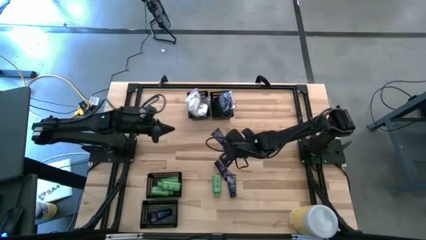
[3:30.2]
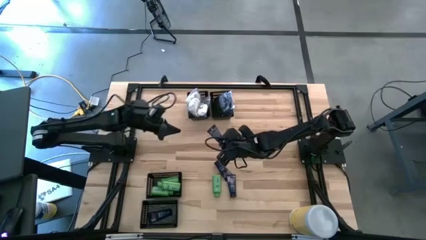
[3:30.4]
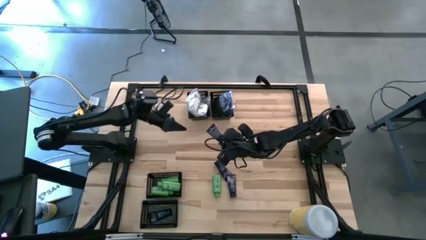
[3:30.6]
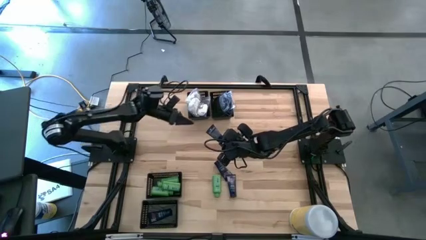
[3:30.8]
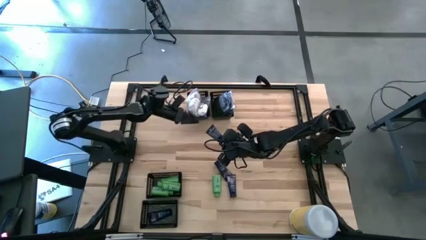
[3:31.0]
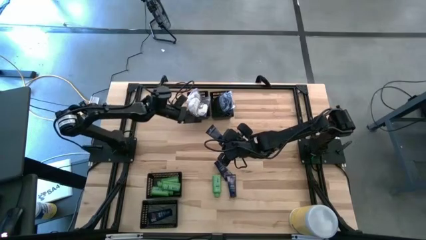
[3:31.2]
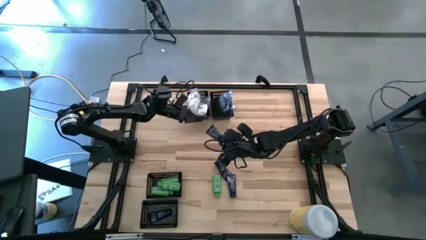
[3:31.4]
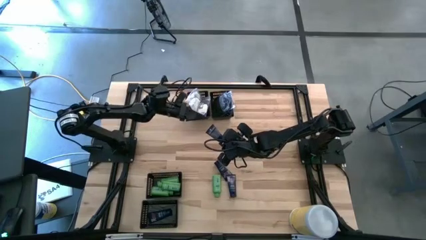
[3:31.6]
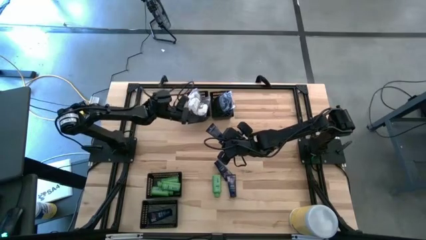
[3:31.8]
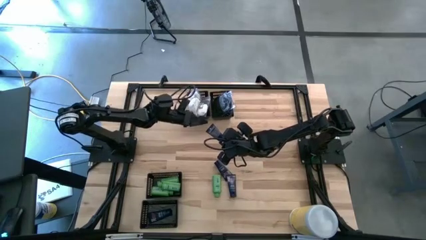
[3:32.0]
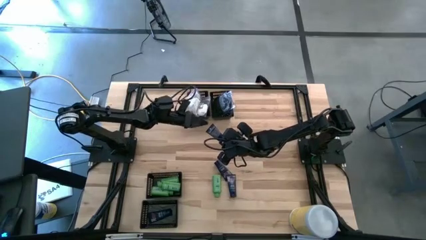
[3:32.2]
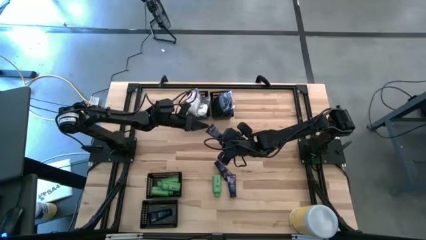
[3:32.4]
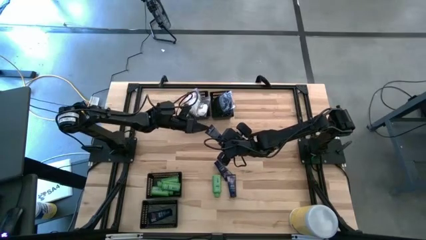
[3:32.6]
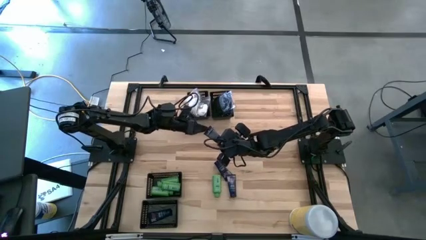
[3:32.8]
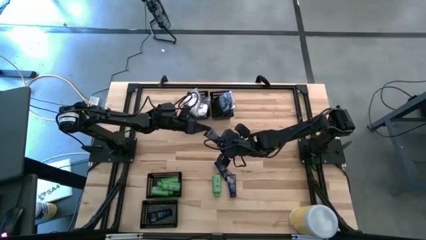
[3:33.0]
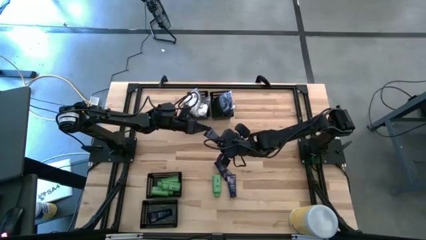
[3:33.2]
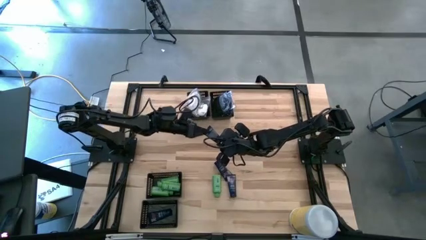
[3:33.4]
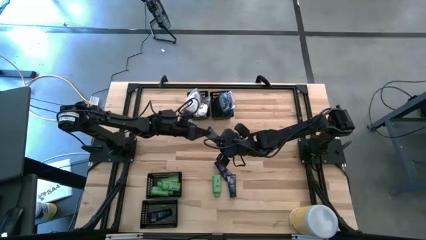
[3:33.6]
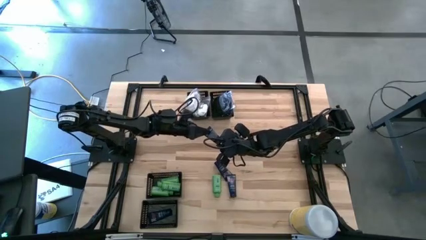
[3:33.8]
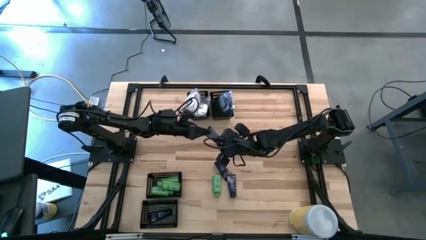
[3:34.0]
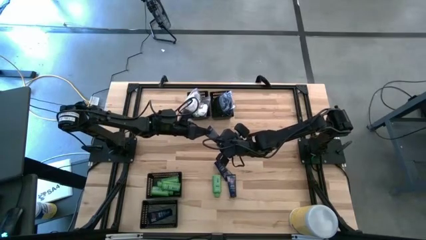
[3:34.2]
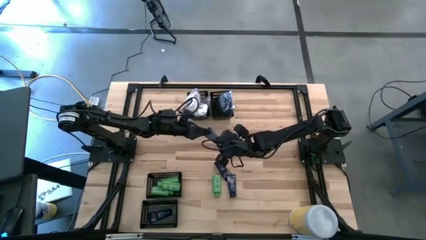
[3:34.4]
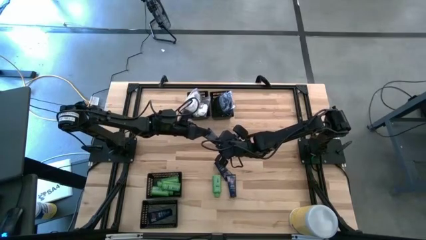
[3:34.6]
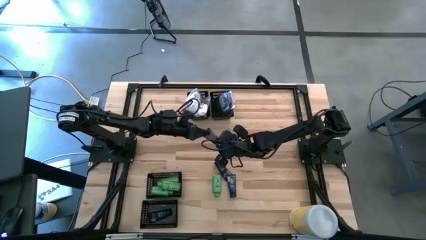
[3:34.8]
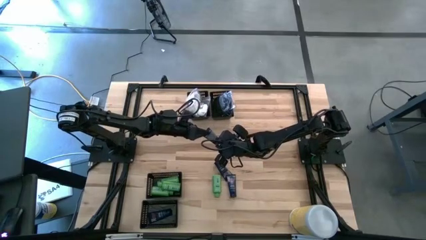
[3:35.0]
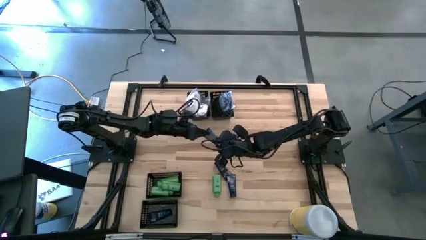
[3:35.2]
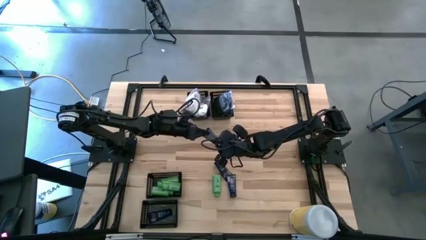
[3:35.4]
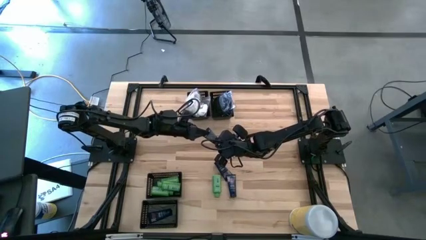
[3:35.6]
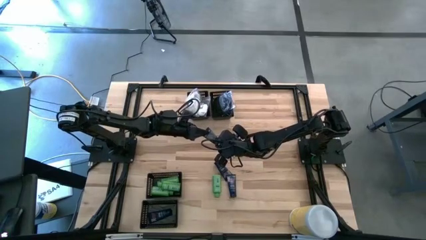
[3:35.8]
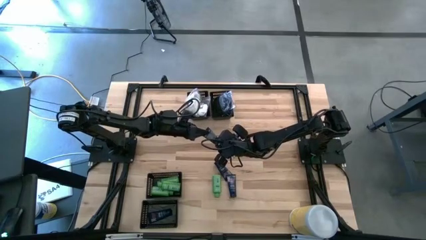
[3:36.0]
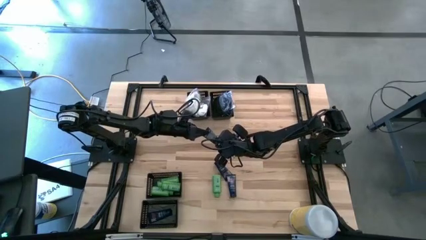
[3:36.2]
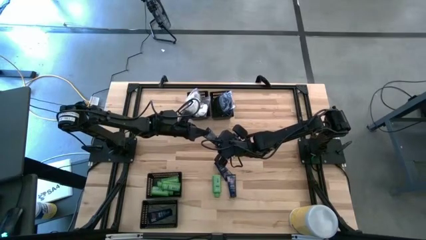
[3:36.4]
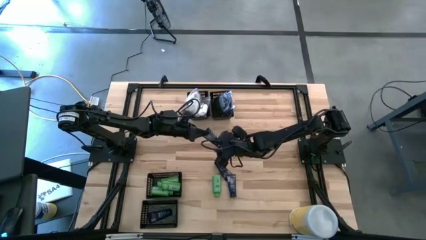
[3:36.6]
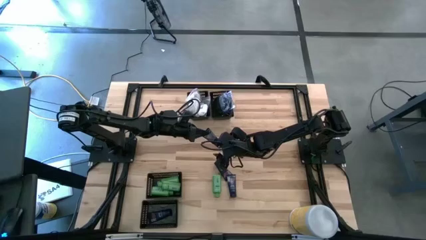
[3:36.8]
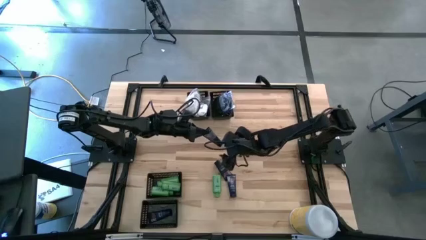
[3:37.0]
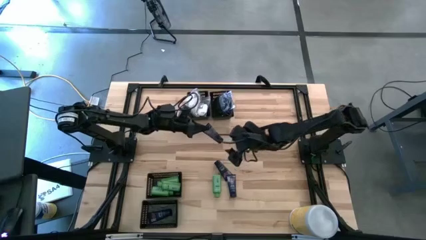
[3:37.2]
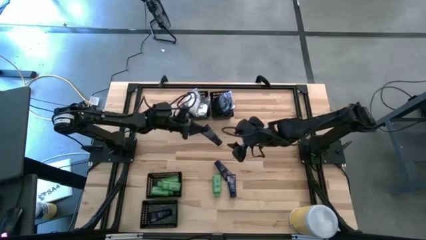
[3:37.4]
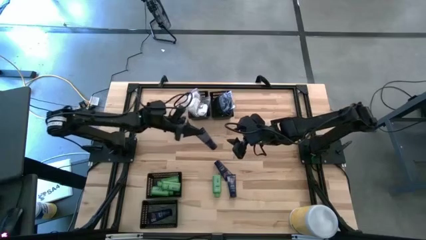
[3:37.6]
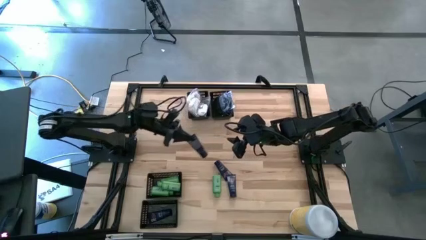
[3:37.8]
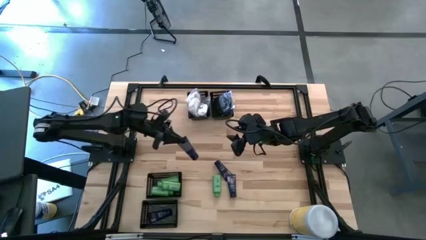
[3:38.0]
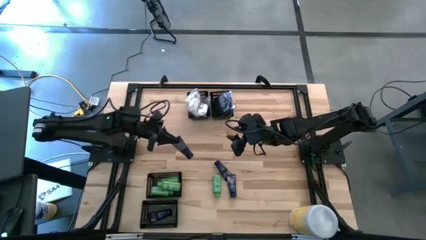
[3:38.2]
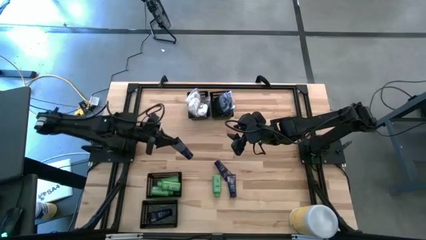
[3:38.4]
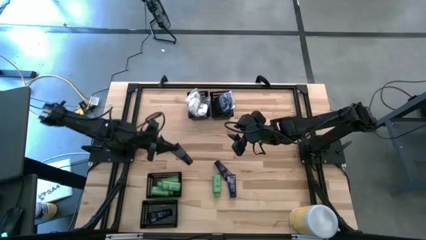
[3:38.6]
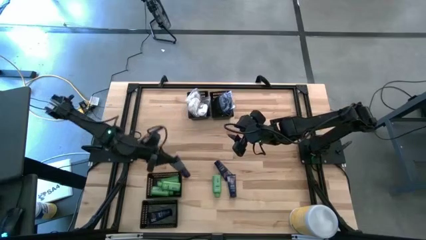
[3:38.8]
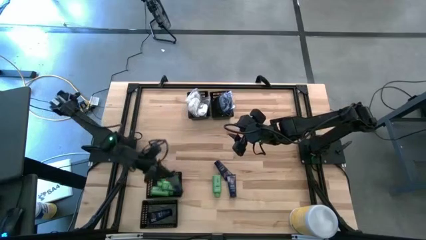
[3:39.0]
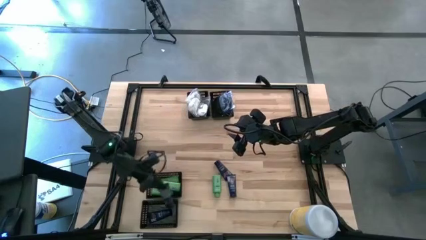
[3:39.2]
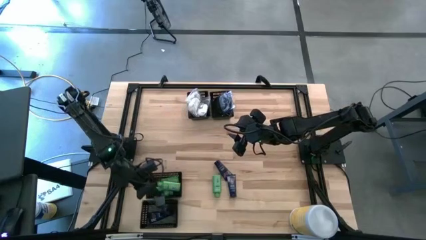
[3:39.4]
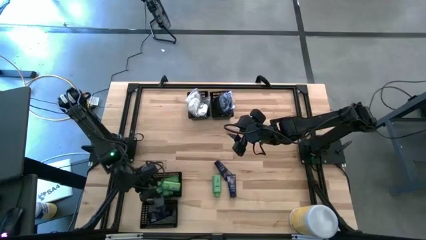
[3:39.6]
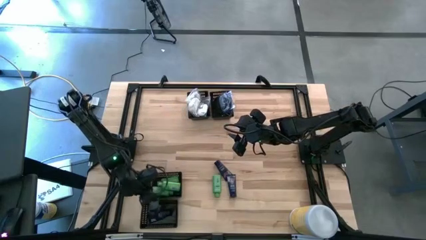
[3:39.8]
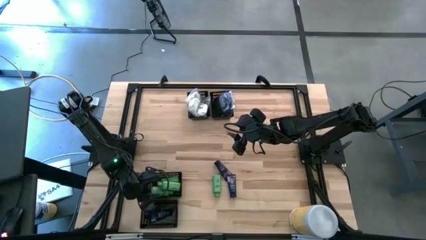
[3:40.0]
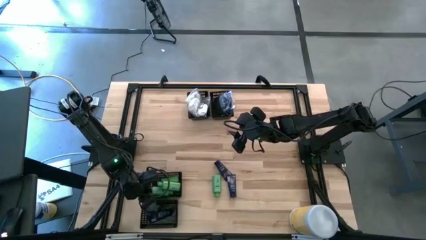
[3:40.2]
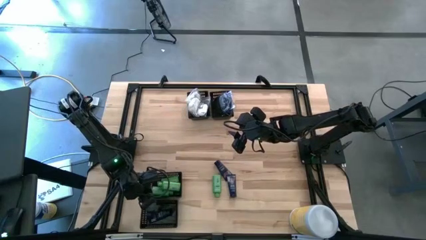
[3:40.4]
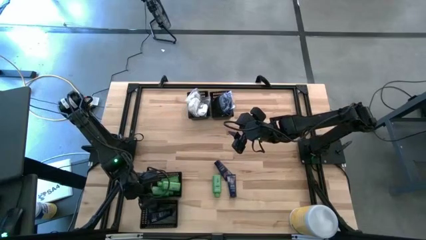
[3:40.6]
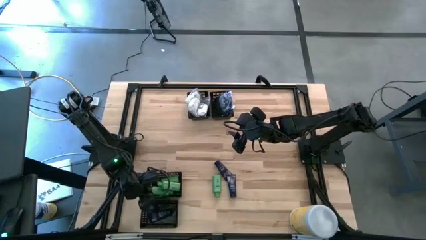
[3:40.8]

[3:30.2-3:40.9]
Task: Pick & Place Travel size toiletries
Put the dark blue shave cream into the bottom left basket

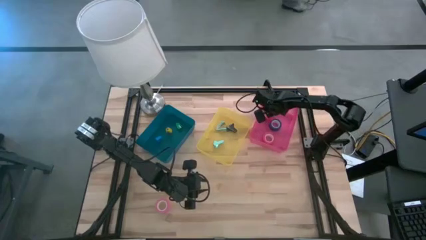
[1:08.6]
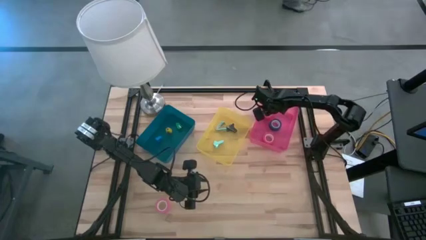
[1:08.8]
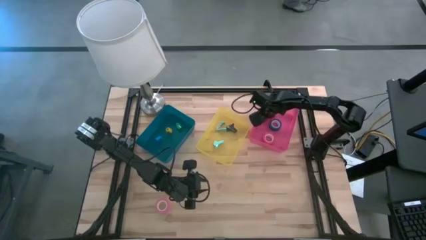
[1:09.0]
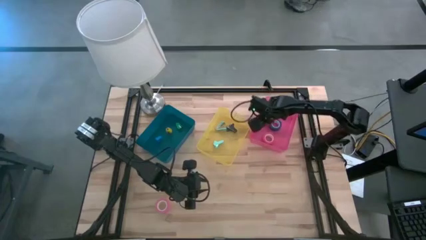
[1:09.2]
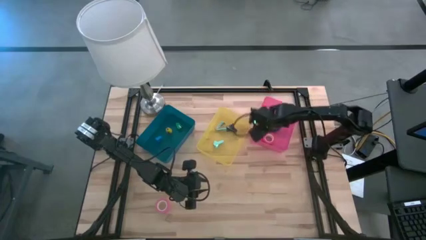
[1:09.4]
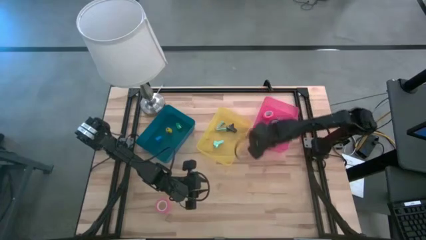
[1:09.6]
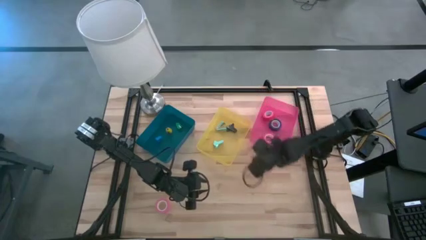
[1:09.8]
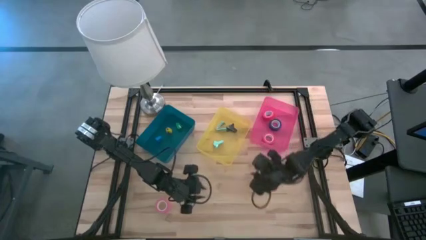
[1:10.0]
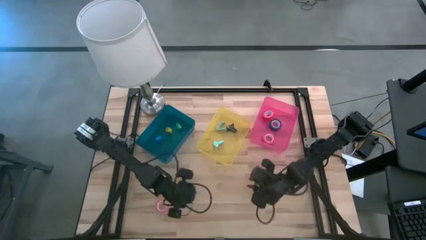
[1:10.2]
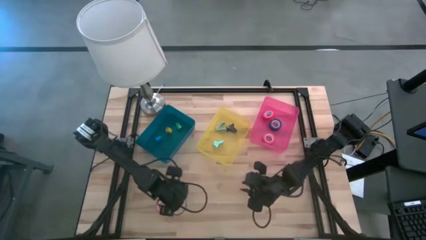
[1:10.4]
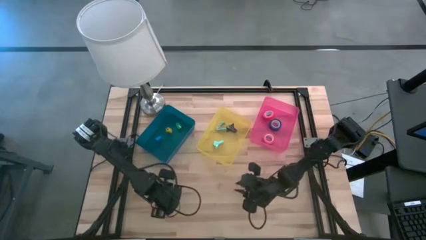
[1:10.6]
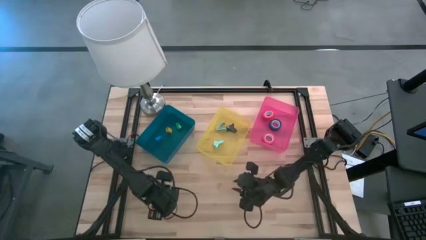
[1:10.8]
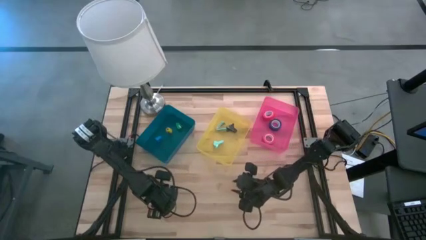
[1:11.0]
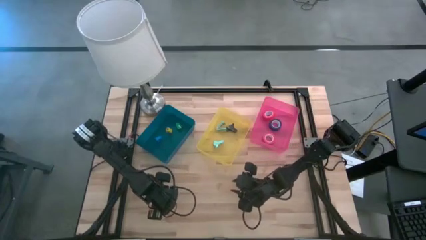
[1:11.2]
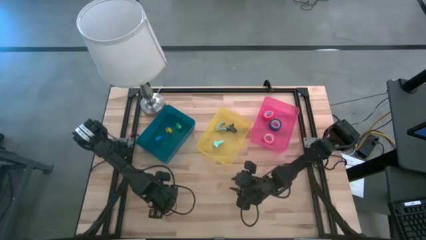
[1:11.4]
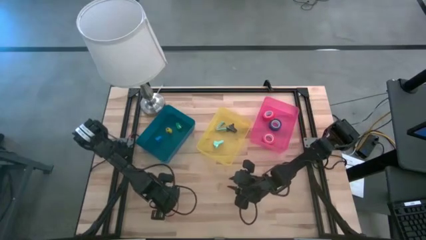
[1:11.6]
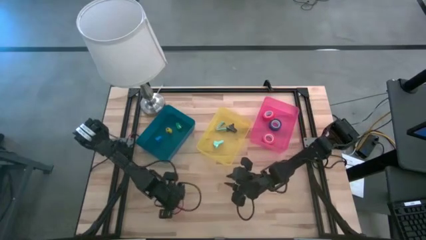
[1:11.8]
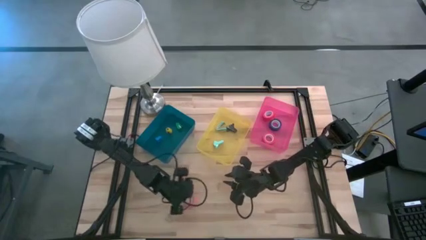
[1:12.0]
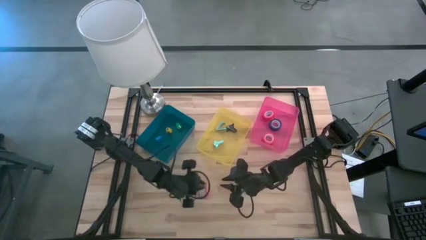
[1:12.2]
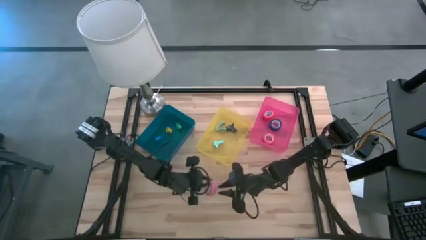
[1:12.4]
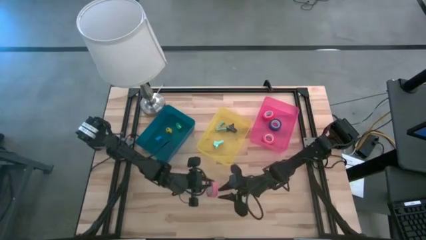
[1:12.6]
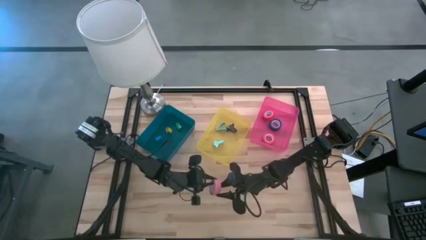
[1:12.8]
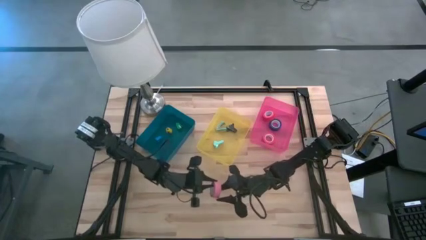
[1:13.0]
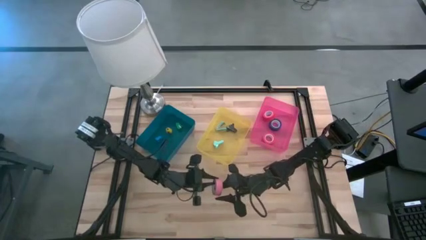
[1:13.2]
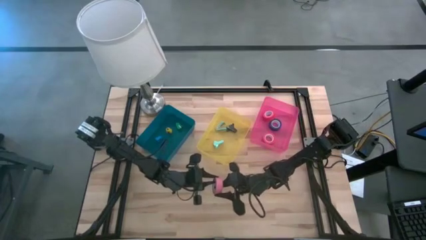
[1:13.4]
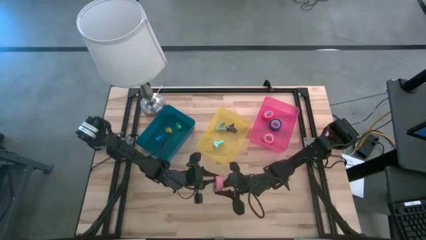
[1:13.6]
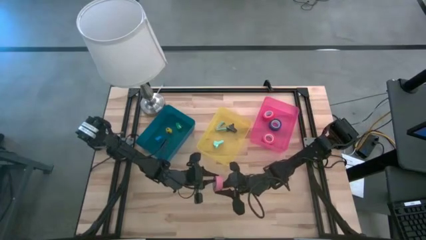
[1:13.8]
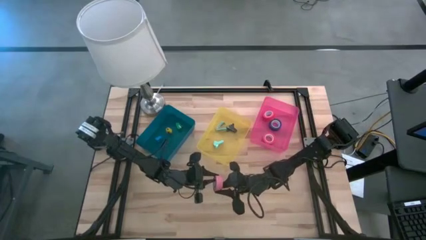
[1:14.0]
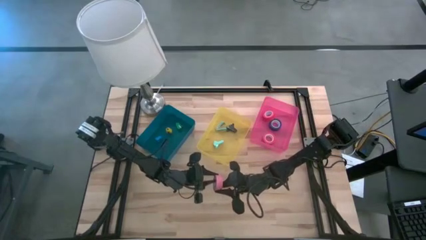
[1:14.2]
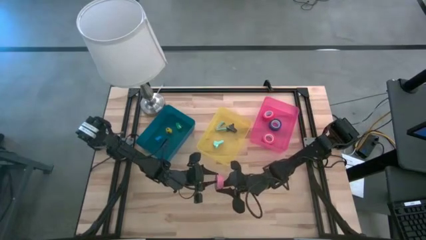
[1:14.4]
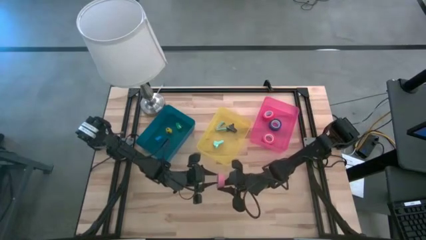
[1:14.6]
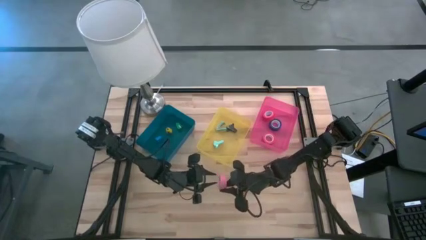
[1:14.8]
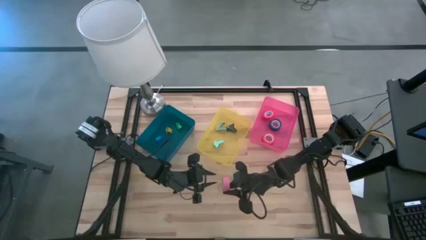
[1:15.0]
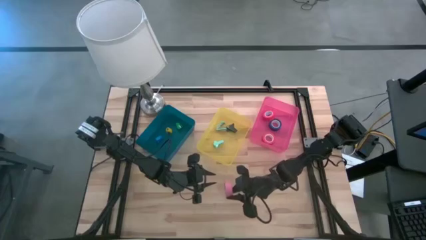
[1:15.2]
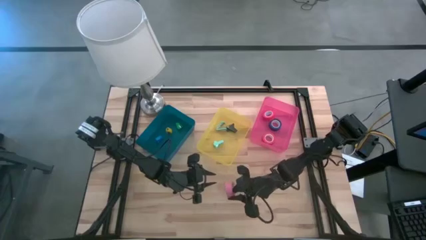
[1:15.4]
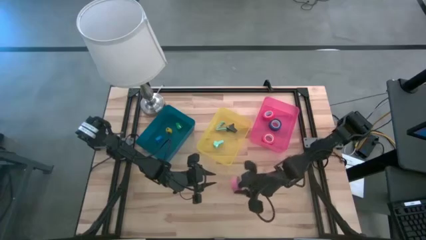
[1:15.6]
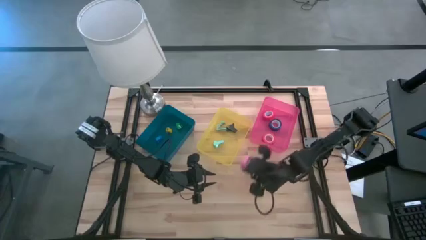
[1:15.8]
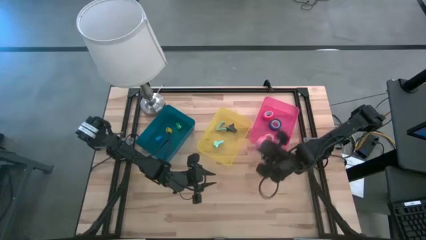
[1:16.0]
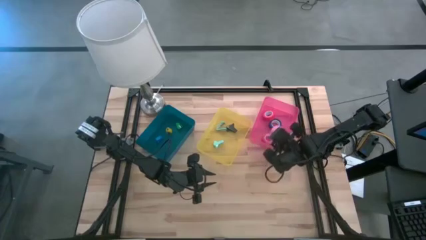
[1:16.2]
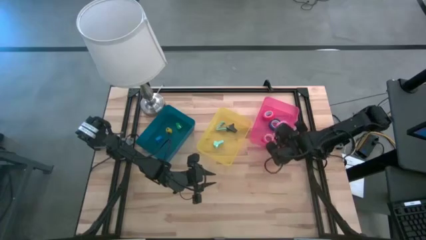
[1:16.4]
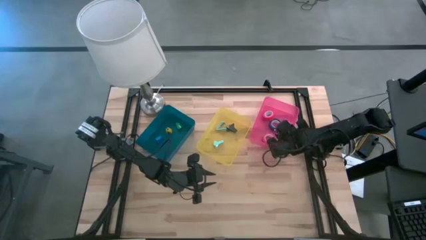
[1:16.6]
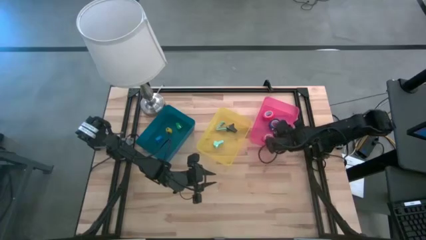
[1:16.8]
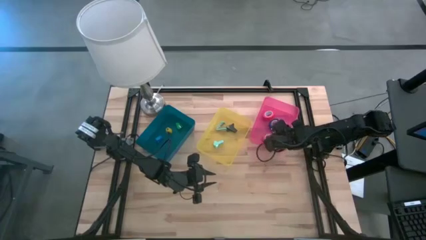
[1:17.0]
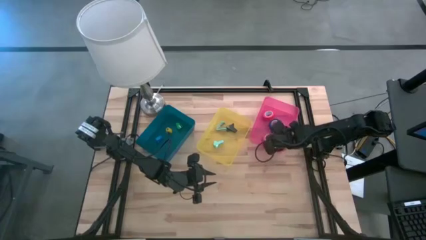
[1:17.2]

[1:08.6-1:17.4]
Task: Pick and place Stapler, Stapler remover, tape
Put the pink tape into the pink bin
